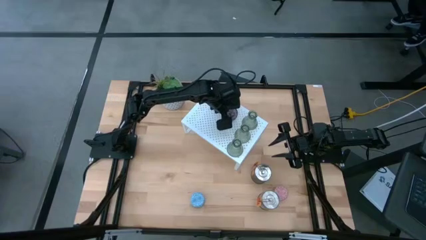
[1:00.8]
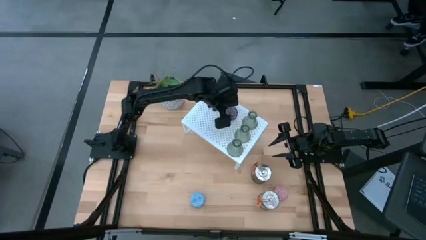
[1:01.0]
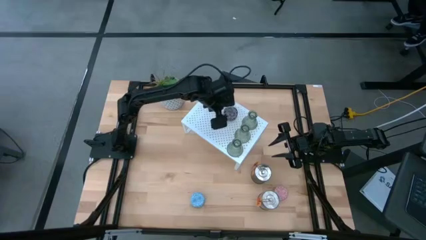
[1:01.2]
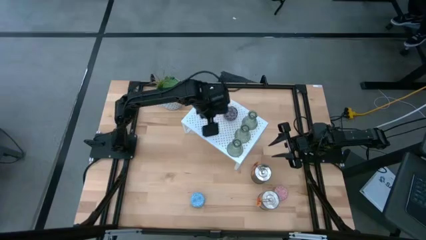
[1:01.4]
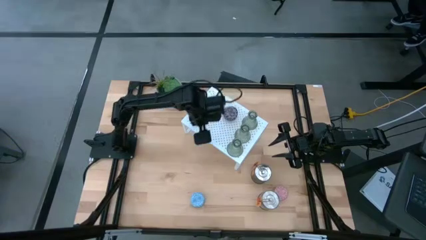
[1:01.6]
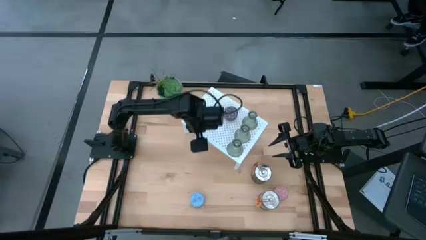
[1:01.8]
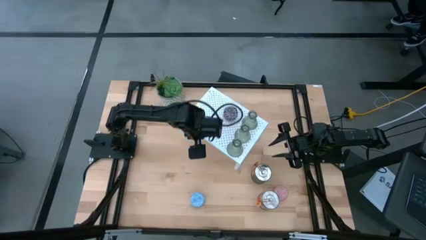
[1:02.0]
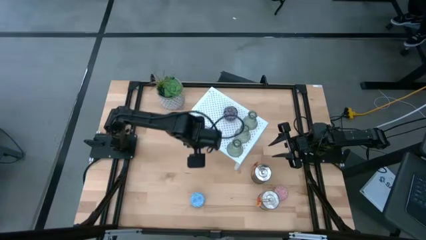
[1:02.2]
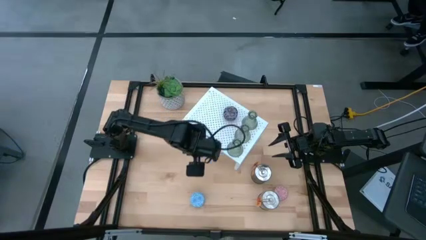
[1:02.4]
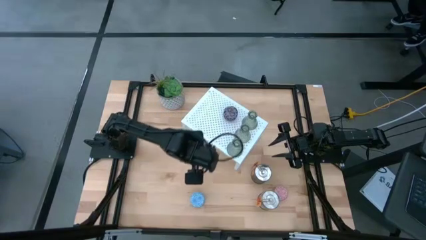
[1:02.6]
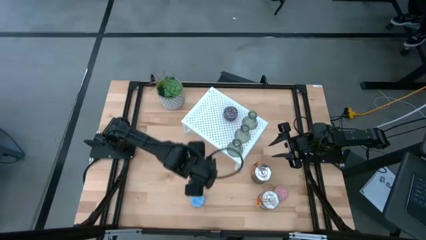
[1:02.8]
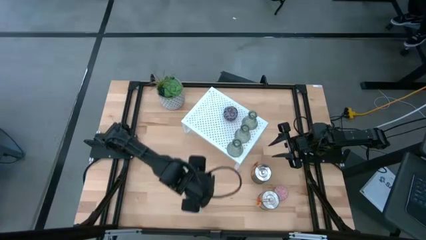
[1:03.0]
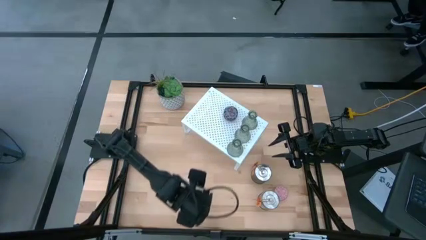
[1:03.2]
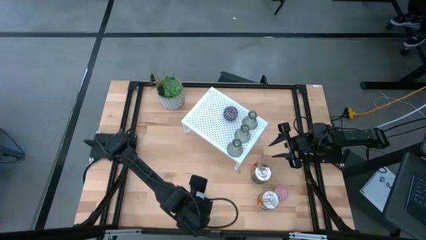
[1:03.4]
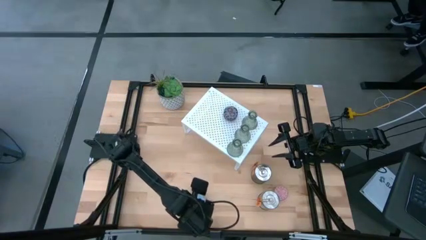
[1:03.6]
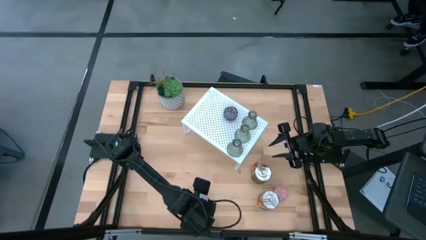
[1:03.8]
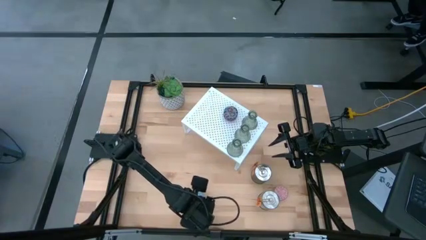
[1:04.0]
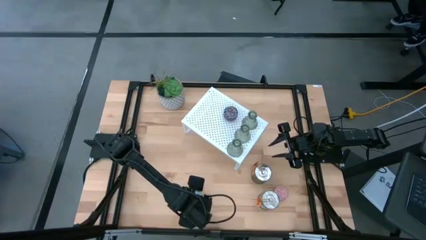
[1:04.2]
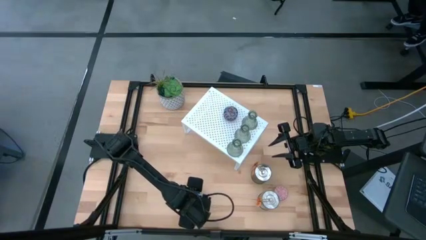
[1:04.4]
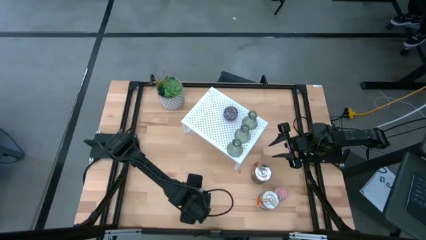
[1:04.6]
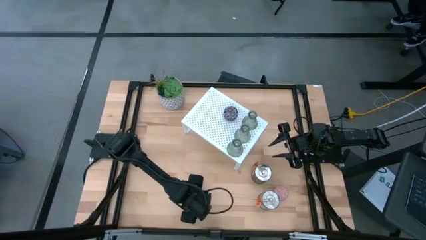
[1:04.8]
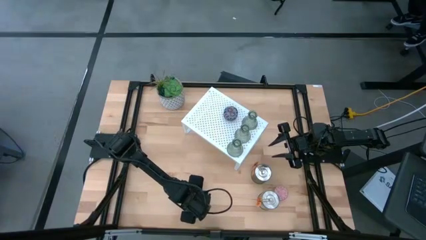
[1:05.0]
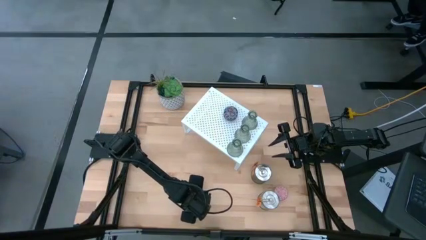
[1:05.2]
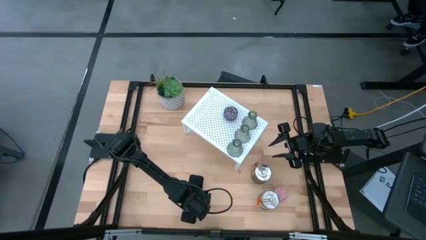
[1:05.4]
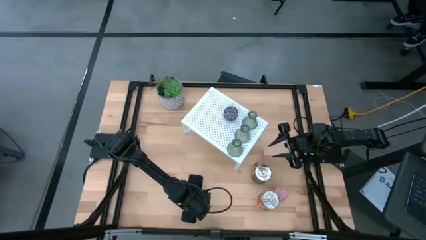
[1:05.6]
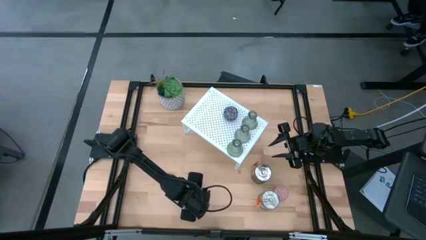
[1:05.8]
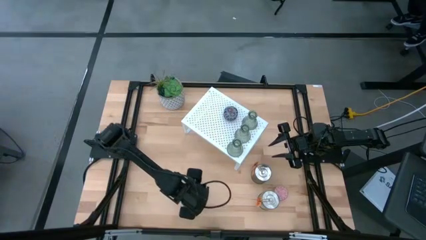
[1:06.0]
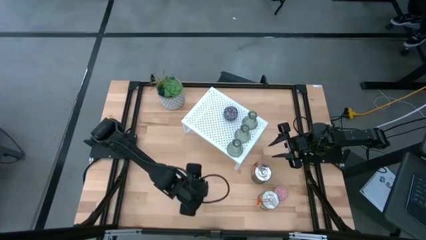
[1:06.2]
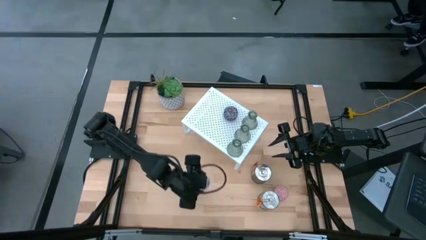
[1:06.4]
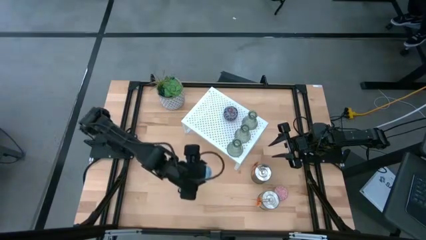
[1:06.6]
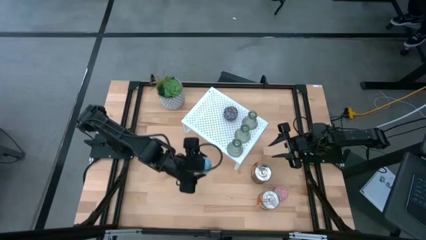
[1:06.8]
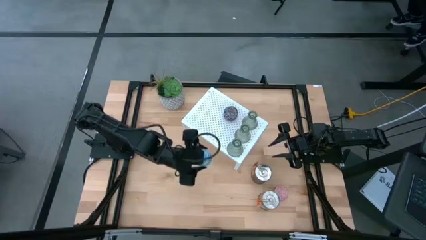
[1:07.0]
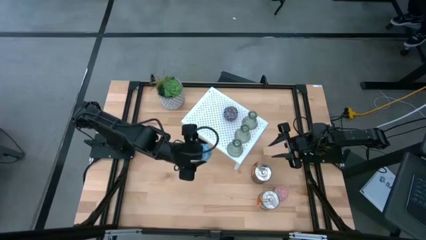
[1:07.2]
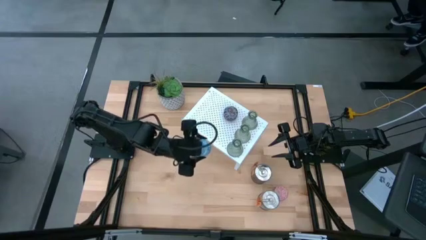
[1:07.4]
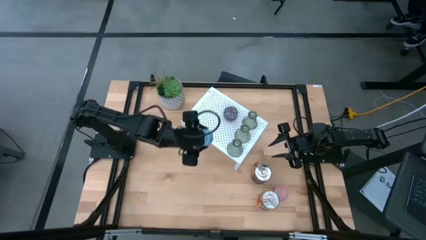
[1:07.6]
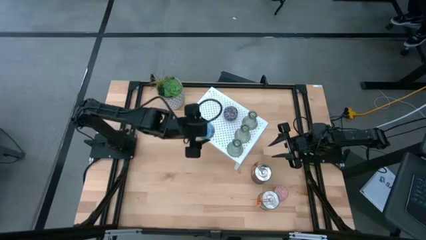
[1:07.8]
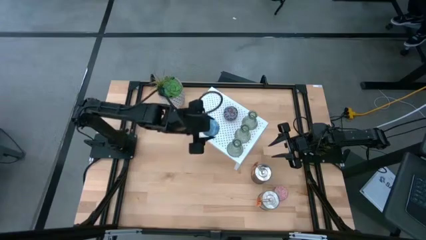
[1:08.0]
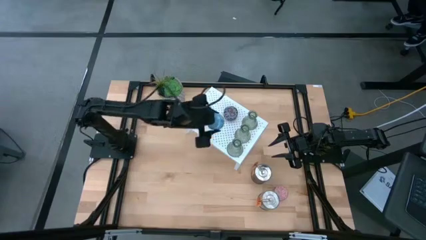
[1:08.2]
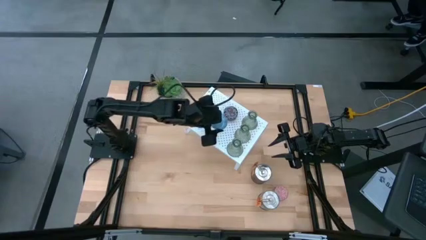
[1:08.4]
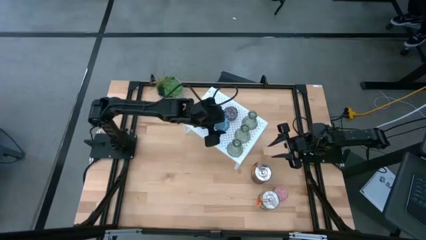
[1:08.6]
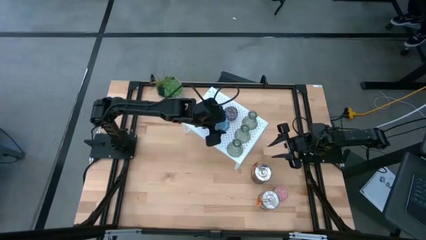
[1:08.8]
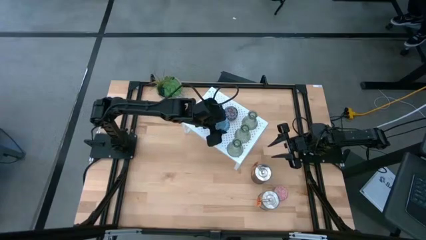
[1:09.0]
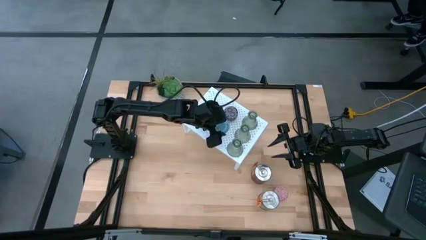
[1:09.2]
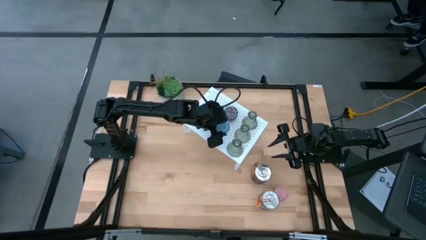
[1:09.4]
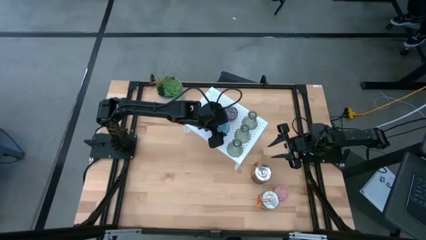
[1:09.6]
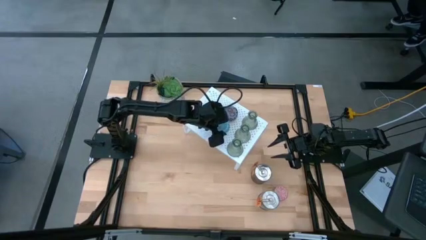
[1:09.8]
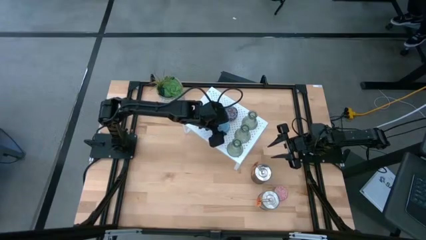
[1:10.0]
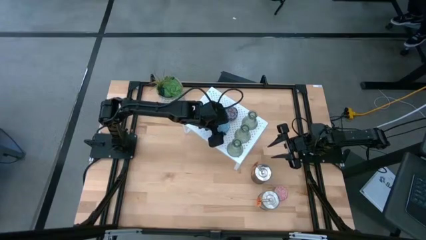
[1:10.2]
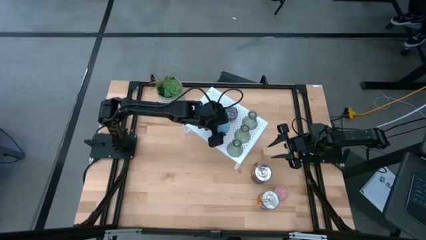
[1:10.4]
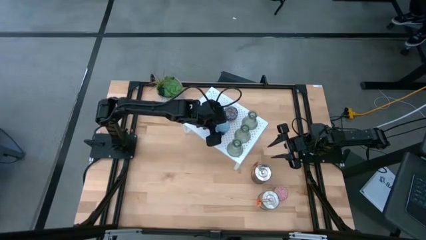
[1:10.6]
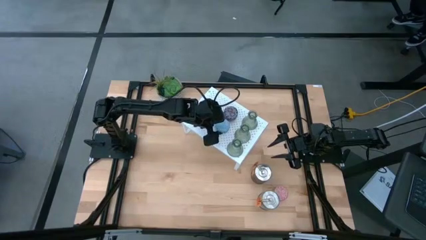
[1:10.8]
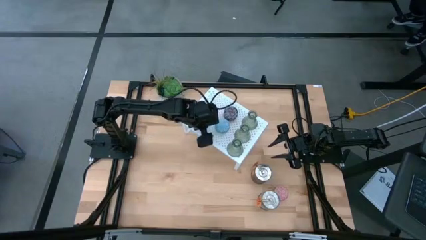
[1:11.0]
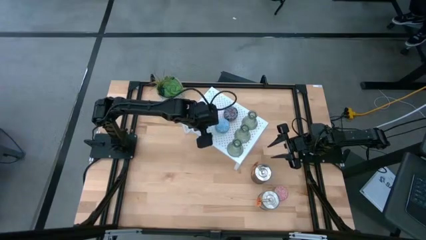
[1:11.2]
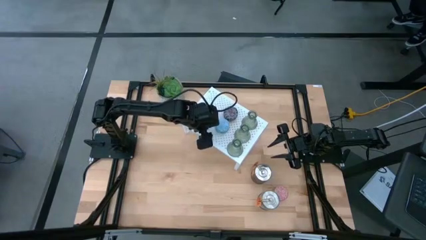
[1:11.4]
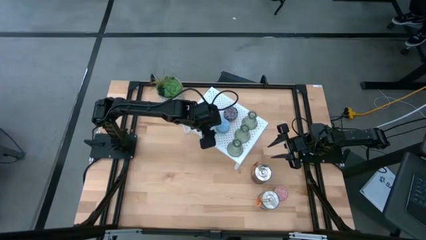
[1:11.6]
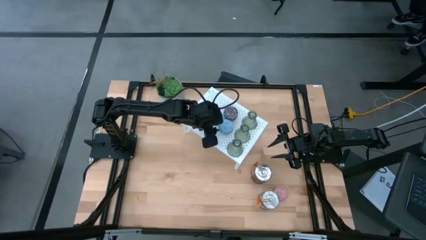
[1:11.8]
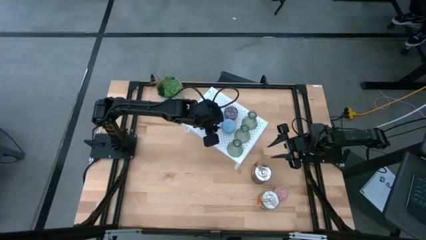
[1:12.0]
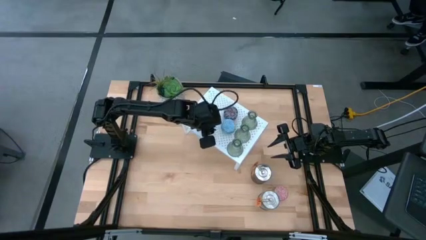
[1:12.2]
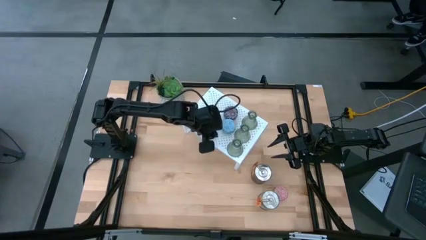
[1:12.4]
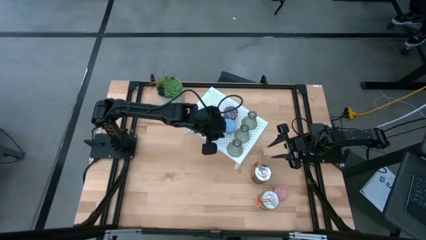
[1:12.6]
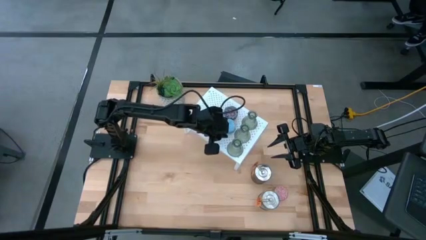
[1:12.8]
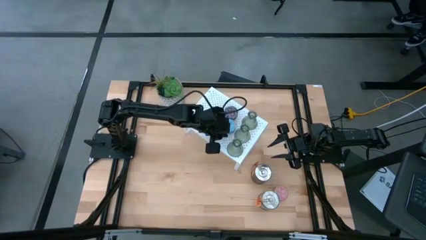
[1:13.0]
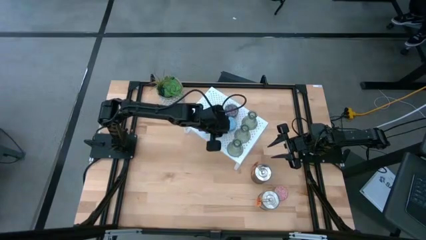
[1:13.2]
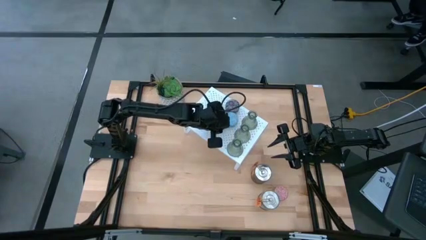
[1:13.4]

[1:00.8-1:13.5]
Task: Pick & Place candle stick holders
Put the blue patterned scented candle on the shelf aligned with the other black patterned scented candle

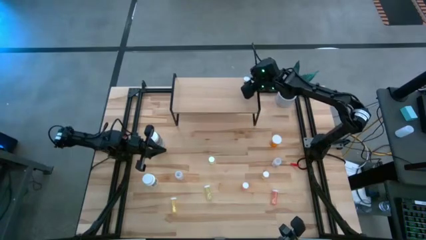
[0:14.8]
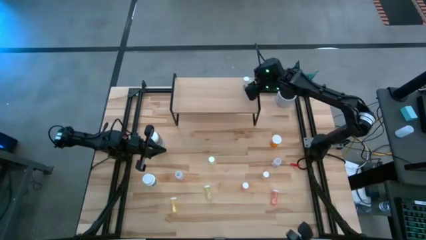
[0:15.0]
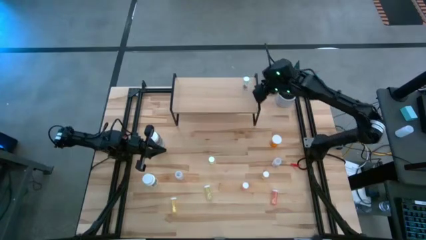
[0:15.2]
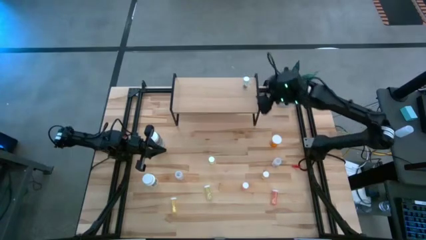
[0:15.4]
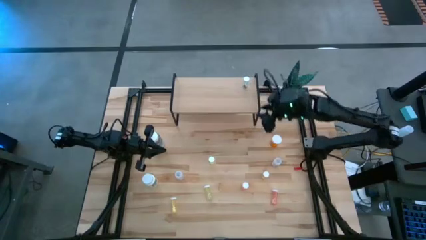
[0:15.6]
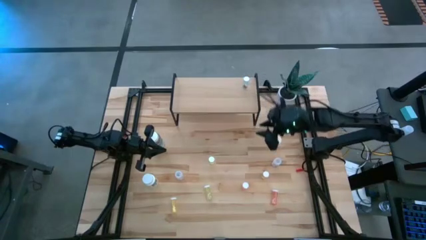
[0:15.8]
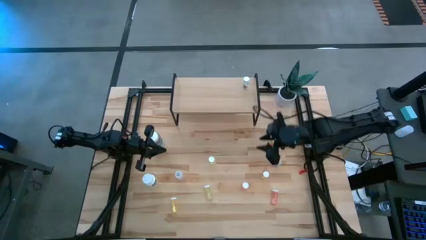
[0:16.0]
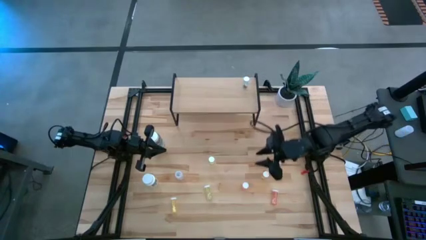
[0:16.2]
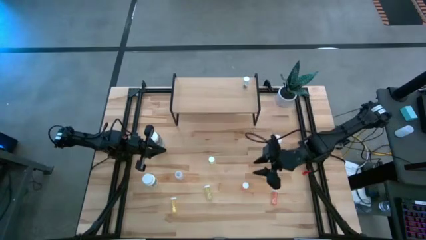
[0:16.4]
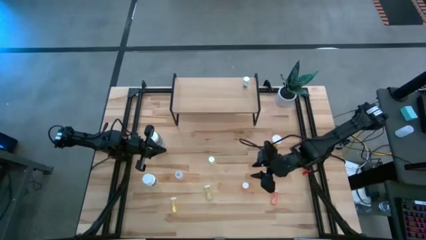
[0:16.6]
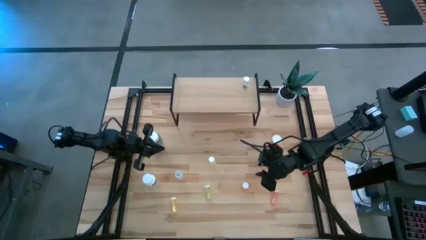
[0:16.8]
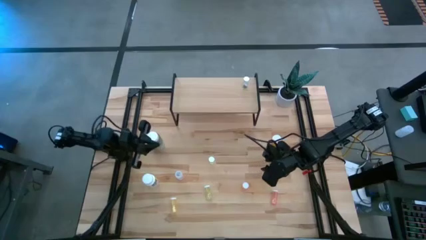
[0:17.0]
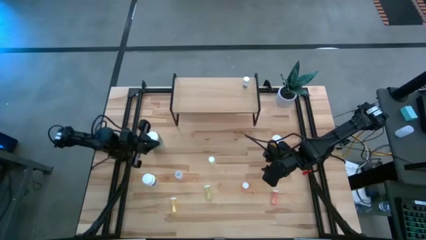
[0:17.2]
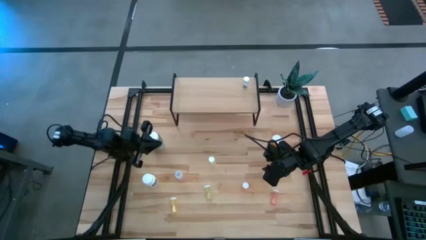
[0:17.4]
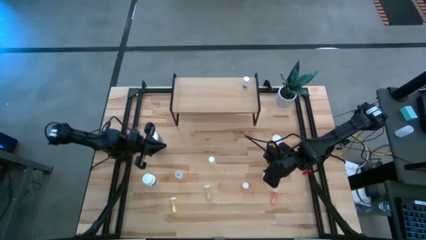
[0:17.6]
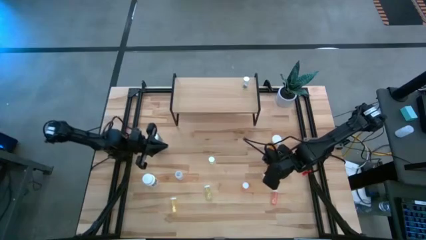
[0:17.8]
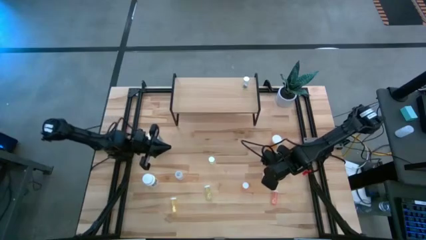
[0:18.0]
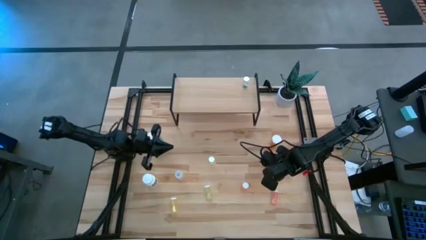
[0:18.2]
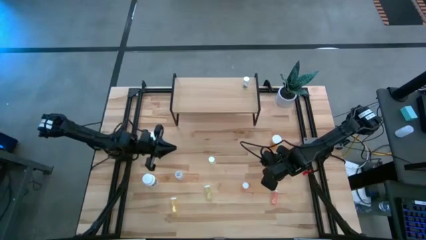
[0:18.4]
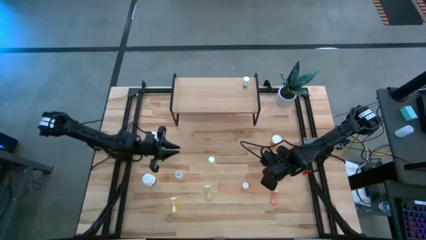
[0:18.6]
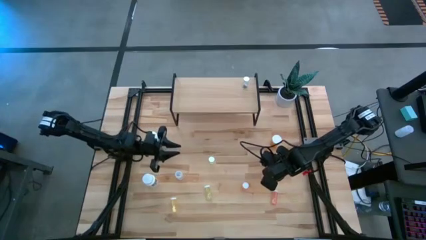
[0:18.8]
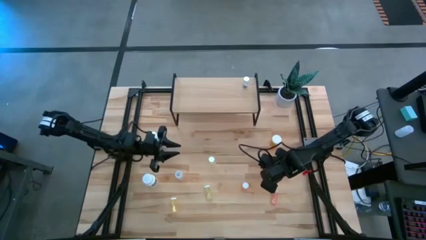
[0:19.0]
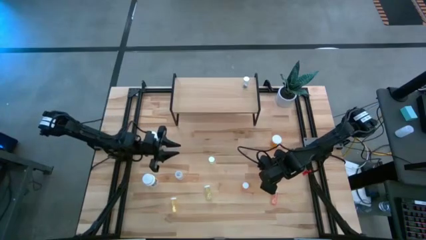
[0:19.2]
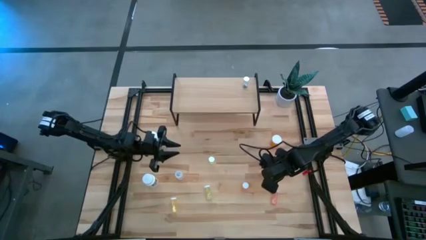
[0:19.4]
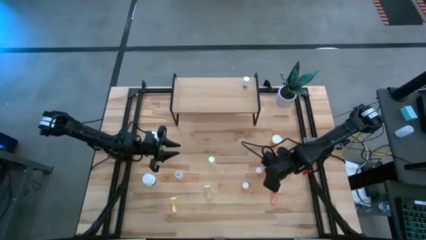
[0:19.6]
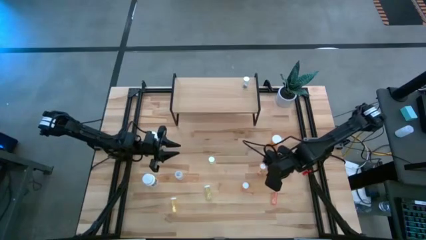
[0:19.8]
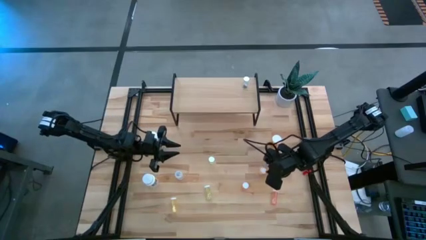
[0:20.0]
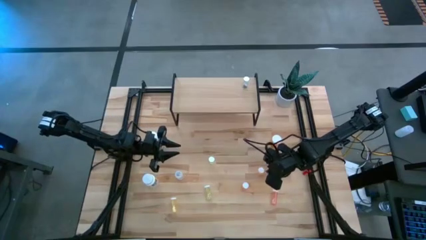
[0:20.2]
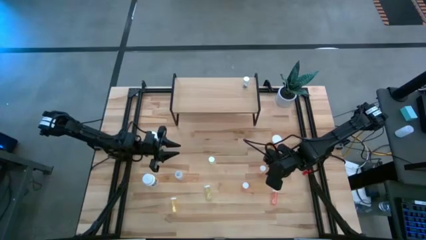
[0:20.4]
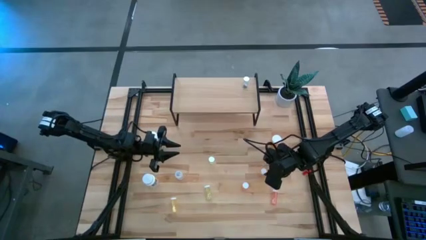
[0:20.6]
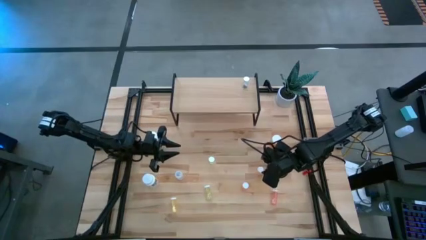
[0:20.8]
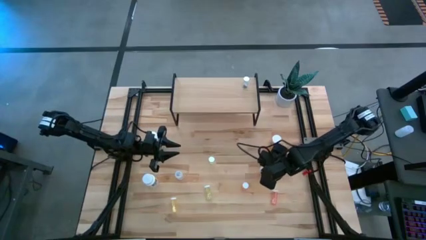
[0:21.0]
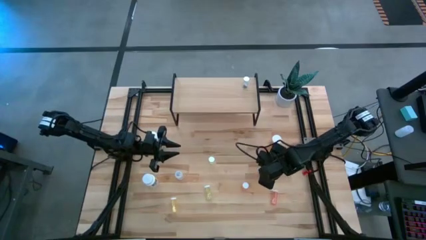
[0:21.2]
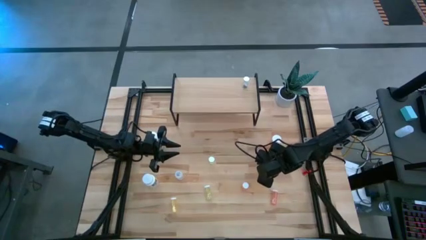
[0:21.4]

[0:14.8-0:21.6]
Task: Pick and place medicine bottles onto shelf by color
Put the orange pill bottle on the shelf
